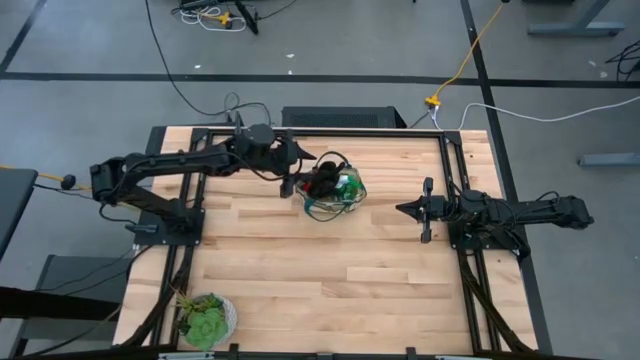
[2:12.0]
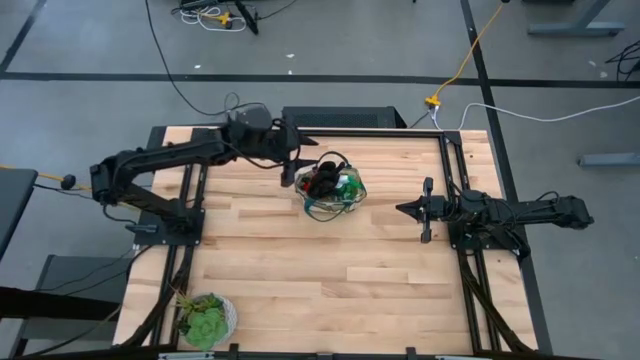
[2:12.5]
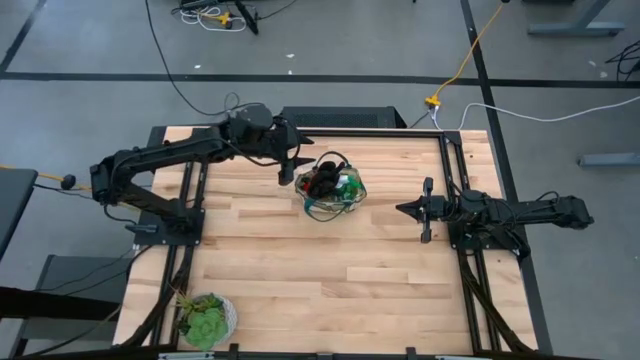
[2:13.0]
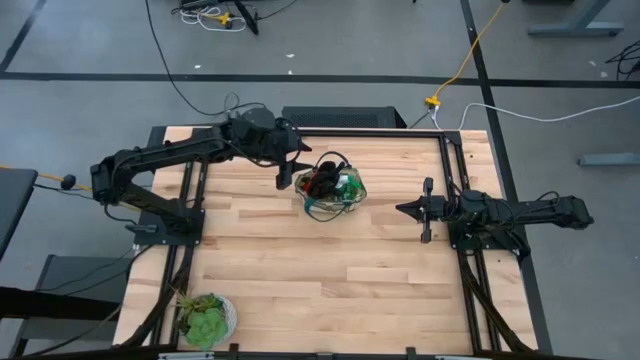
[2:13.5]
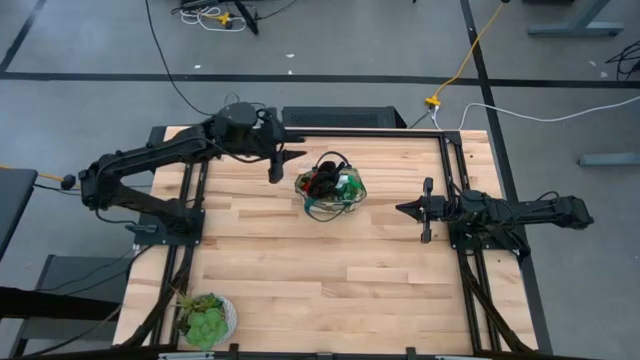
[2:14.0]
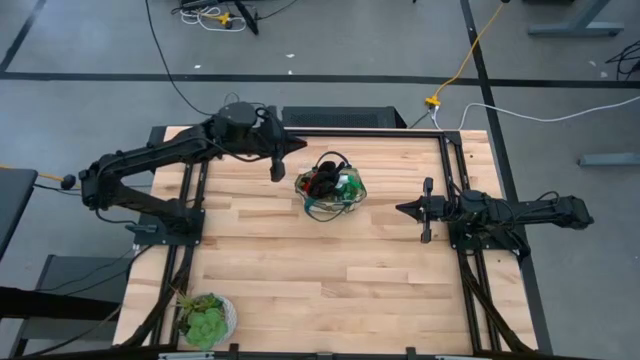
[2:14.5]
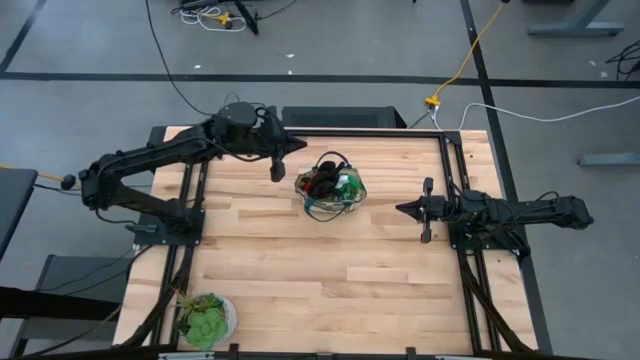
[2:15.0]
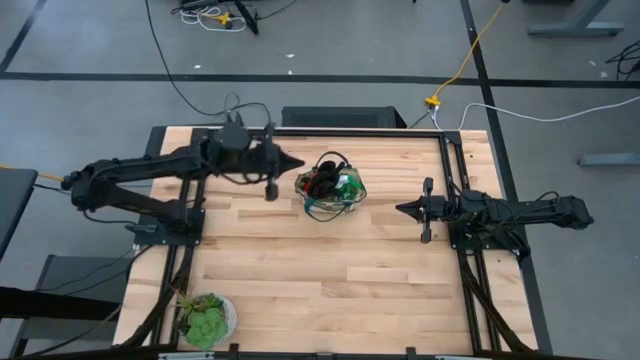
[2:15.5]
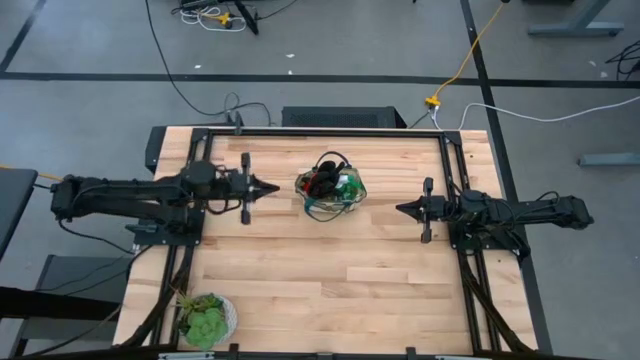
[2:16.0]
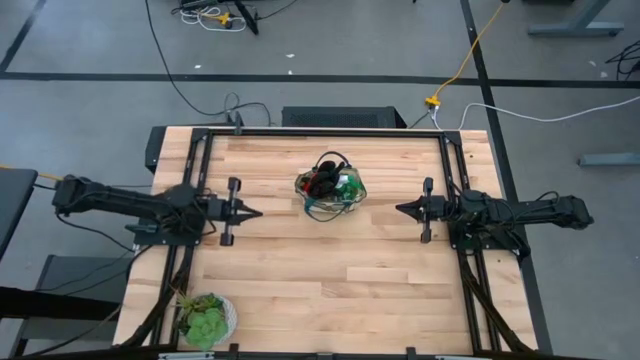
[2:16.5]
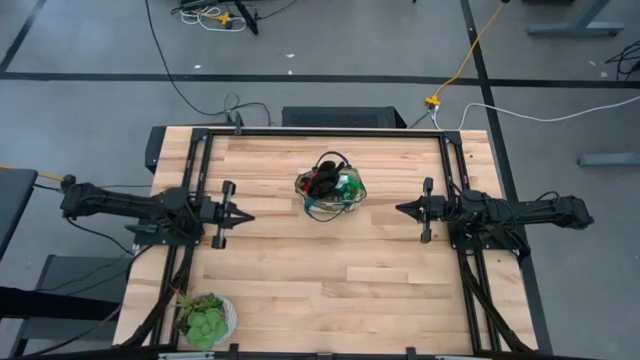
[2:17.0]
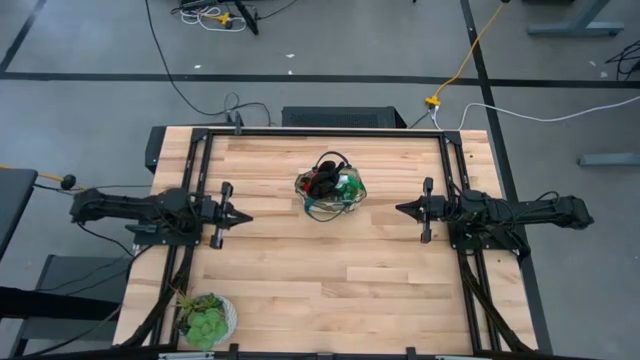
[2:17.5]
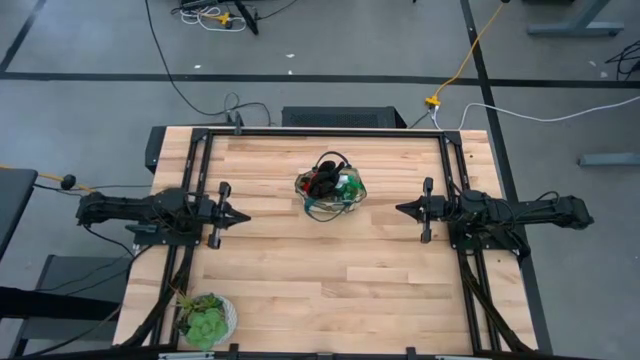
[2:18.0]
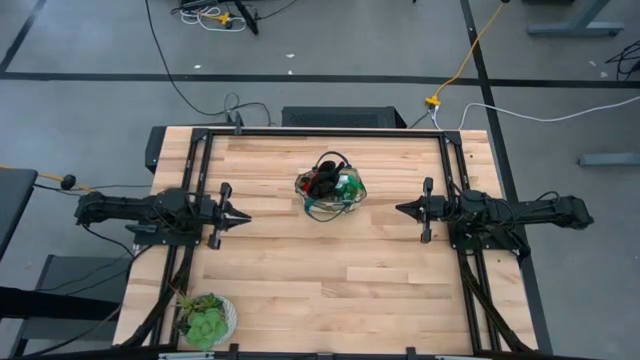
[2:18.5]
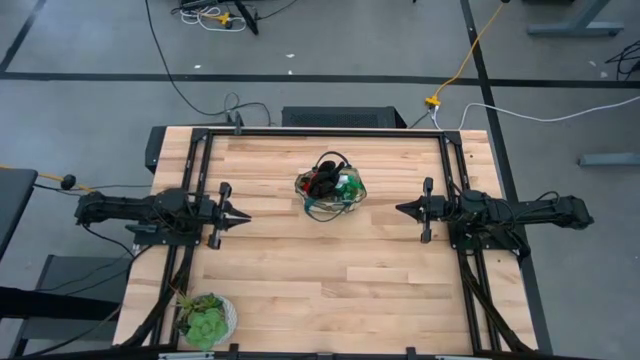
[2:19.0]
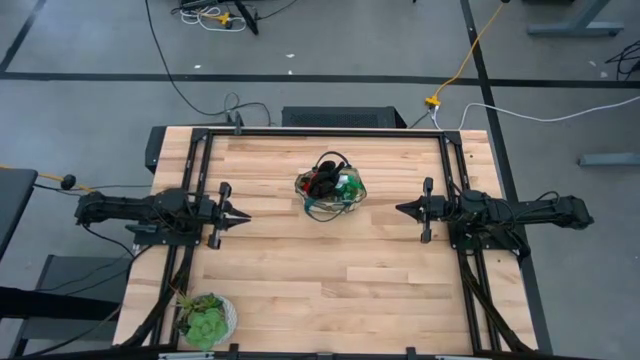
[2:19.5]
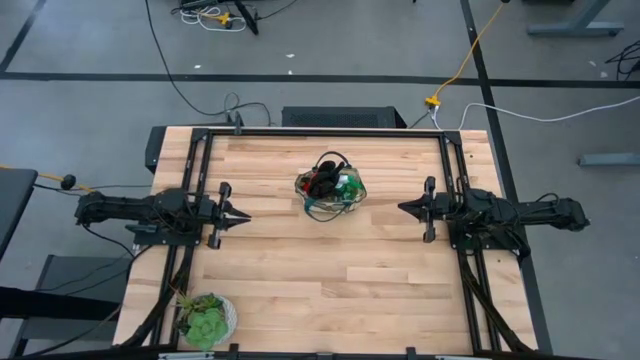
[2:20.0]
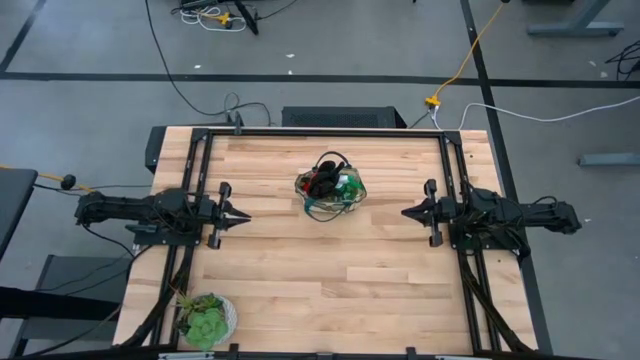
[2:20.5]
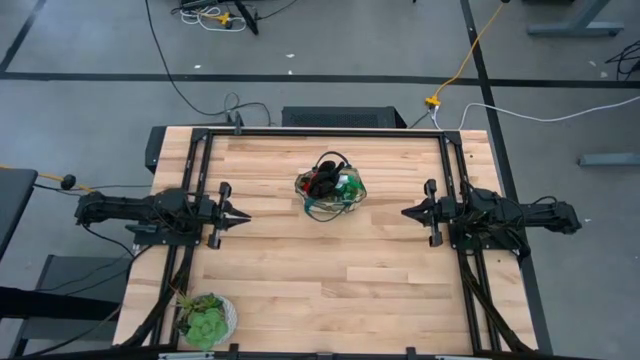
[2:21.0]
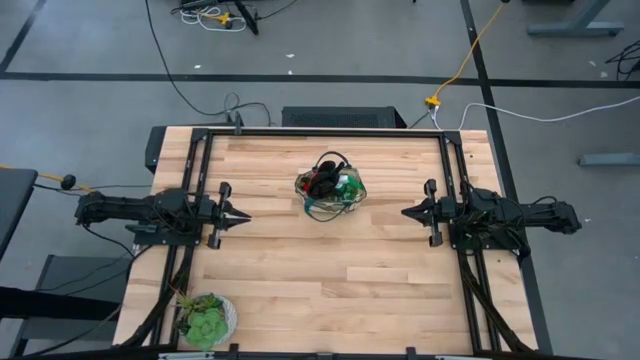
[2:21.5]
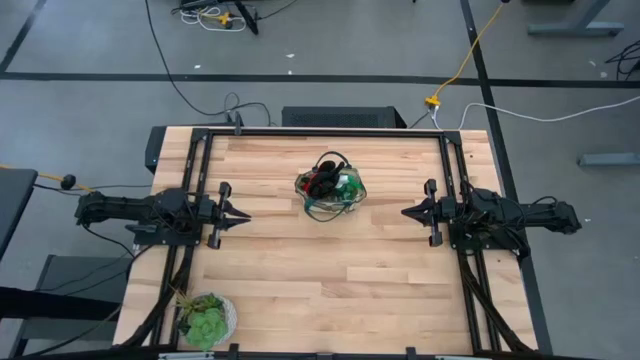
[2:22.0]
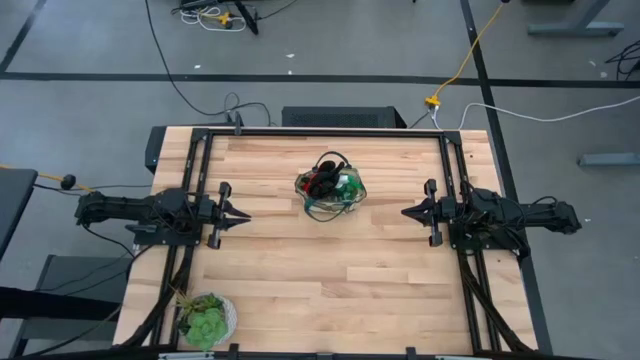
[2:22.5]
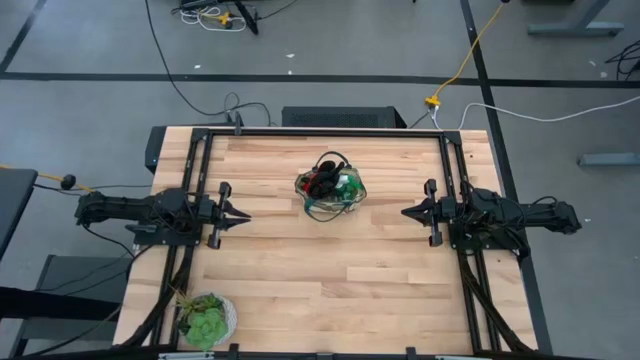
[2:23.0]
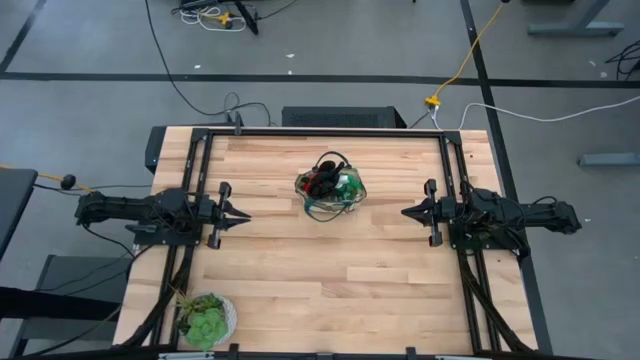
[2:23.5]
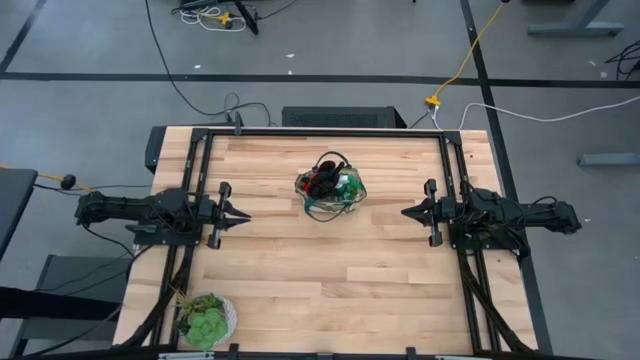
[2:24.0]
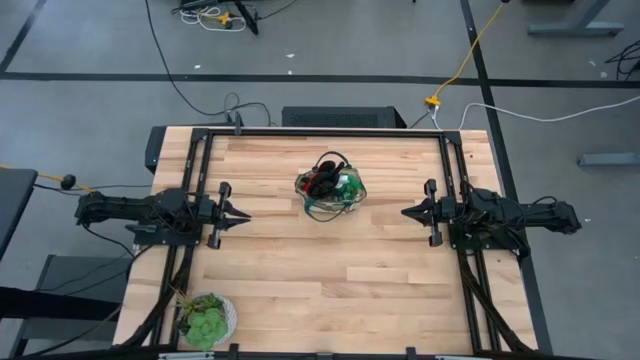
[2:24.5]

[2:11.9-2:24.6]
Task: Pick & Place Garden tools in Gardening bag
Return to Home Position

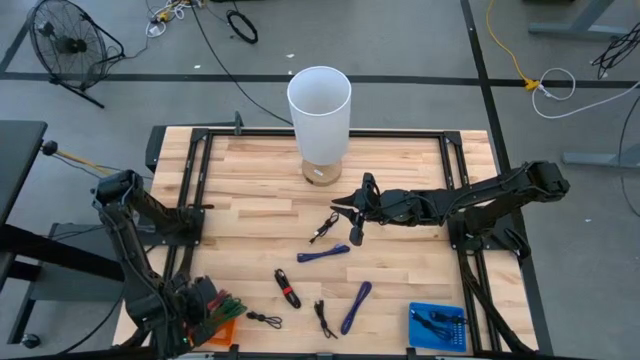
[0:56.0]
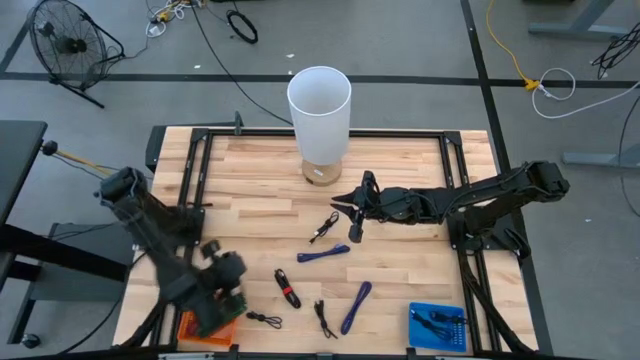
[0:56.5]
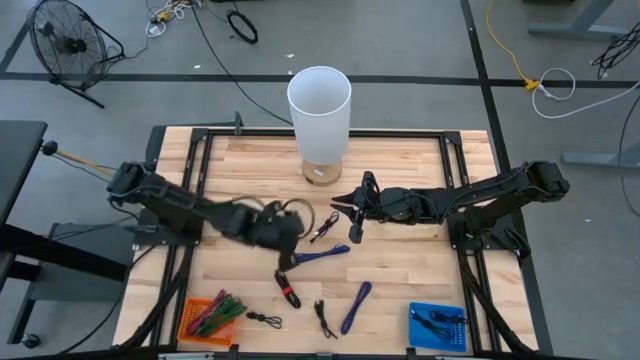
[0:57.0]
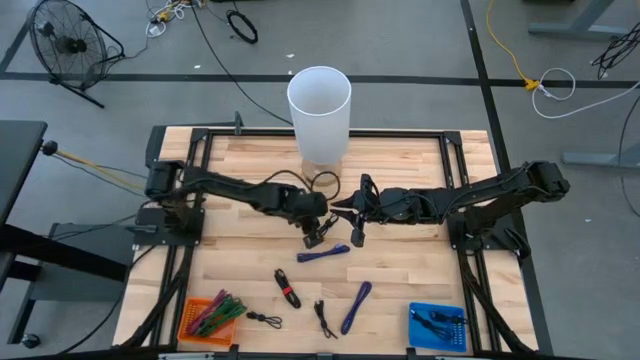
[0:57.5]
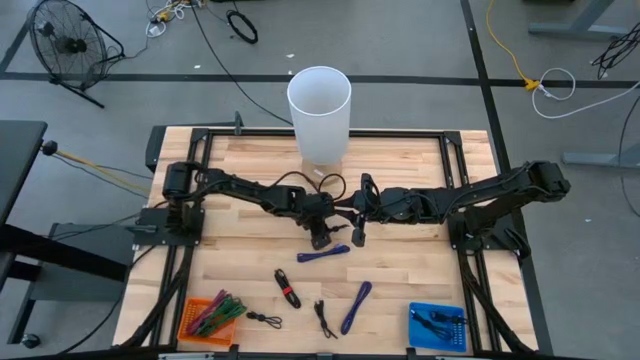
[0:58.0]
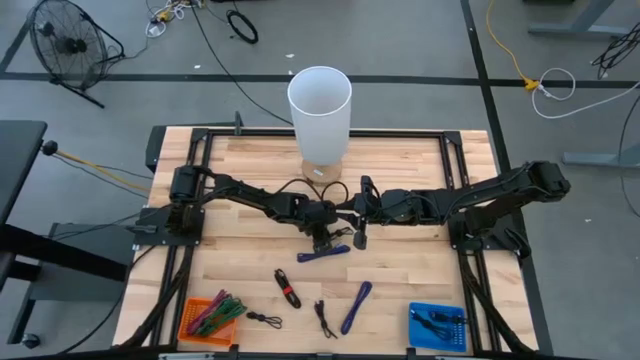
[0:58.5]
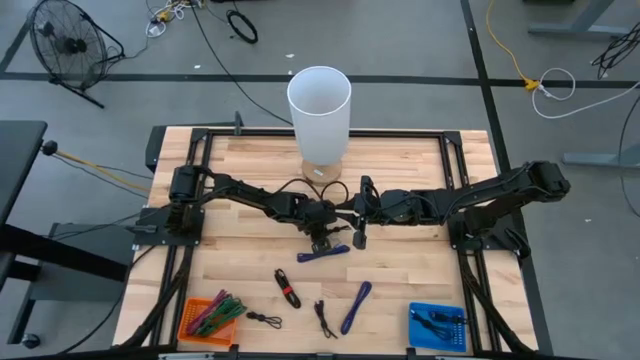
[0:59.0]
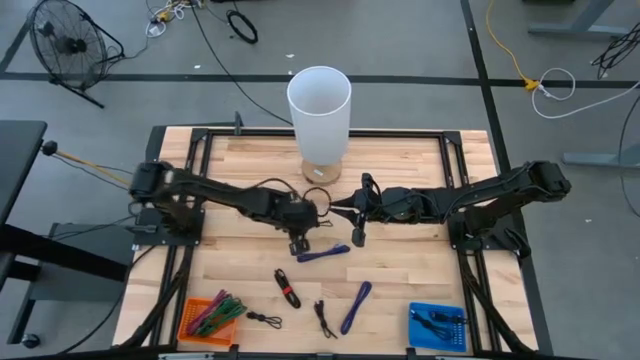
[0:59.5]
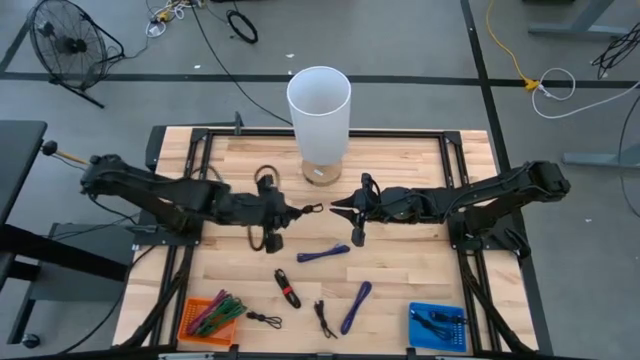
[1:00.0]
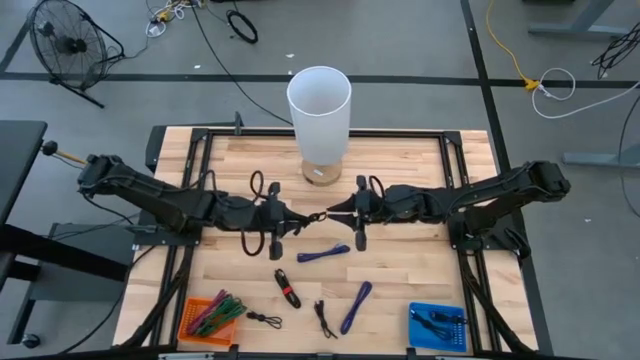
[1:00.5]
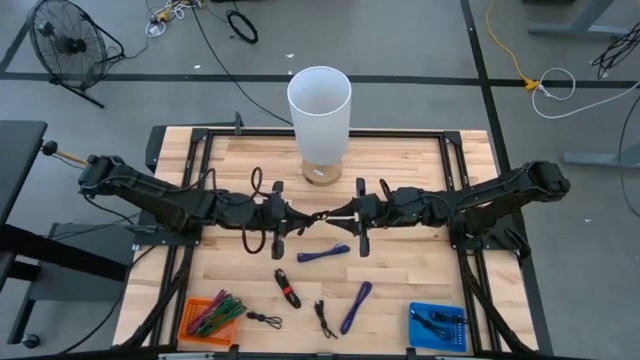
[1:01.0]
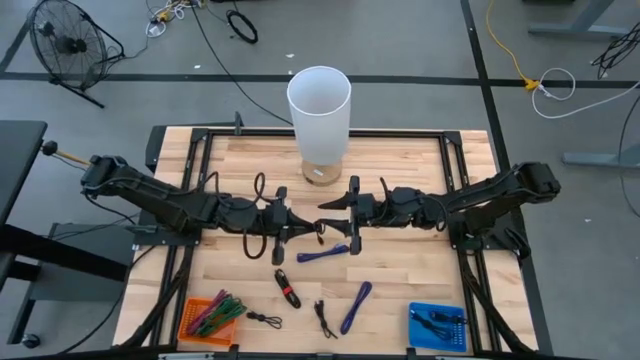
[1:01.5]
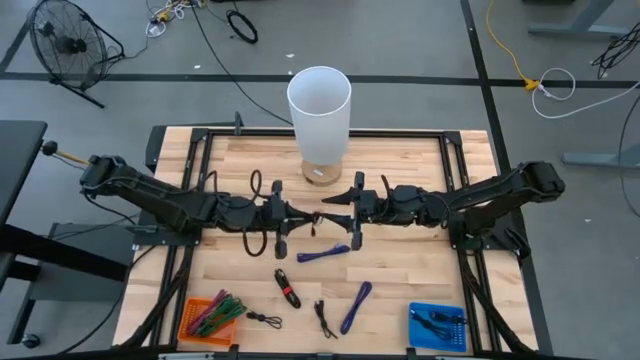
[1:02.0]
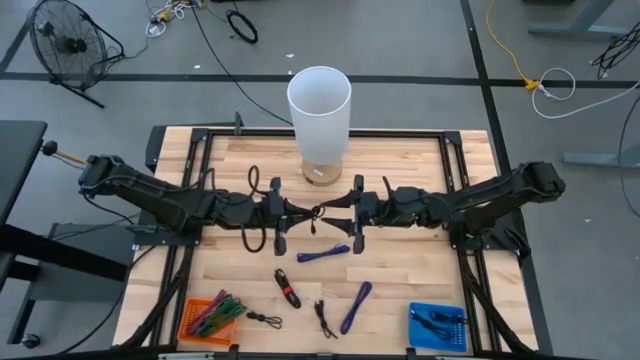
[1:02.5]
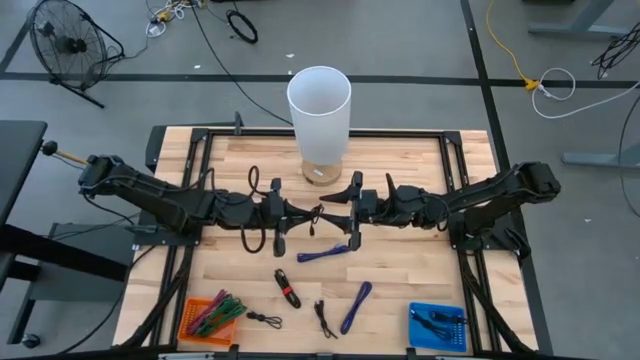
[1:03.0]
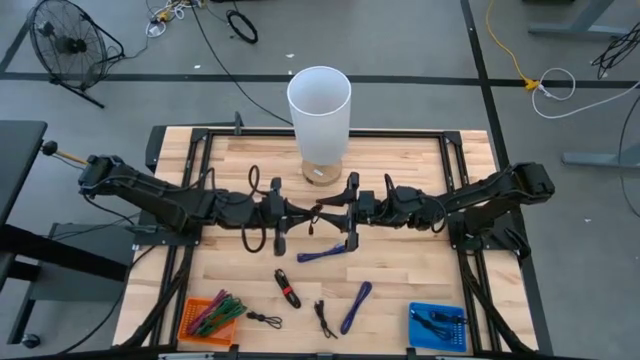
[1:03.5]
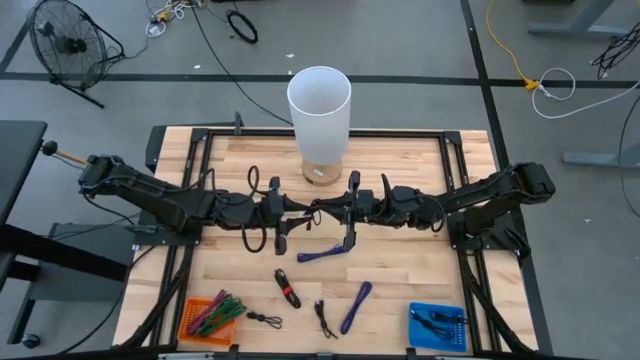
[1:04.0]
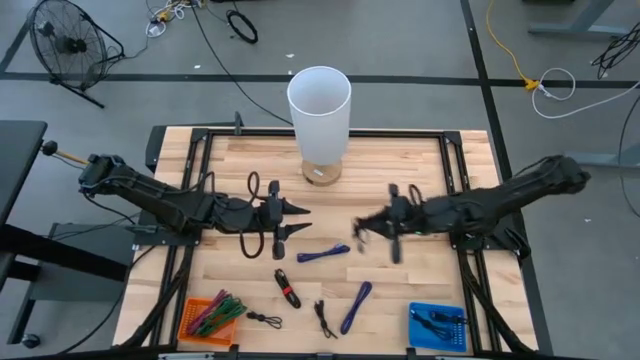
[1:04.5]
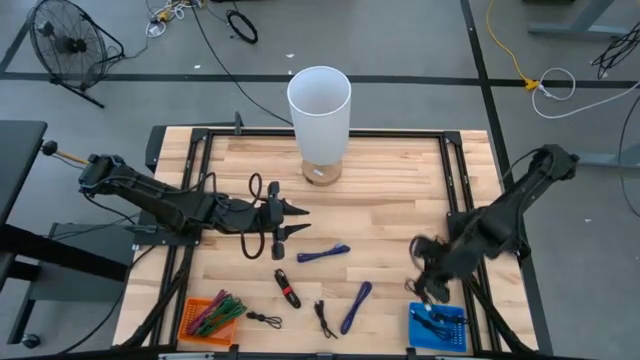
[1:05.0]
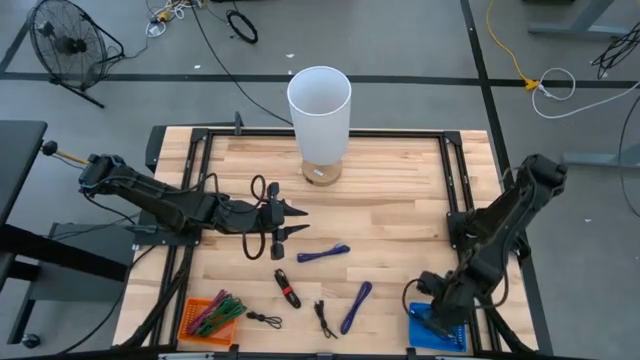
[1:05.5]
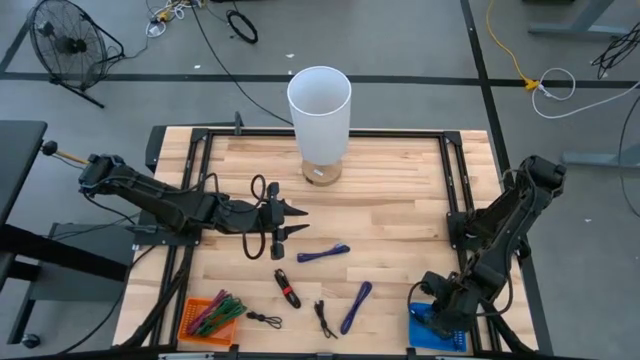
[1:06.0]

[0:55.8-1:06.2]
Task: Pick & Place USB Port
Put the black charger cable into the blue bin
